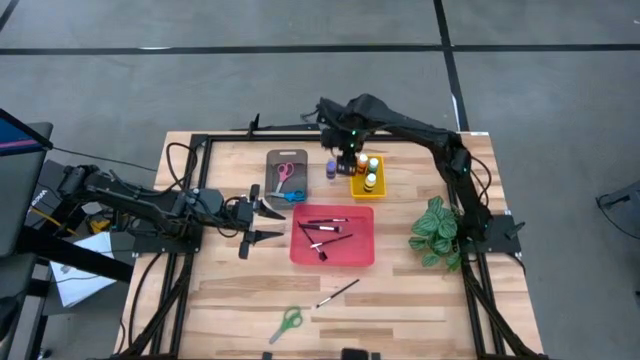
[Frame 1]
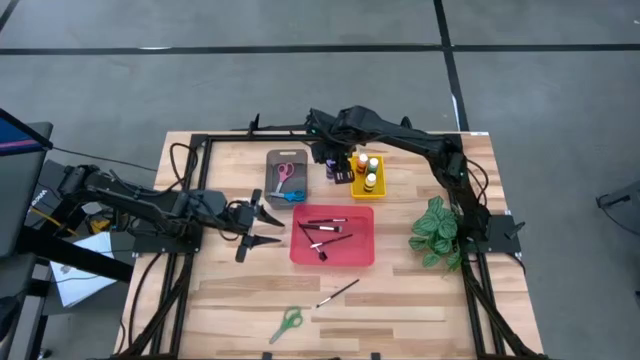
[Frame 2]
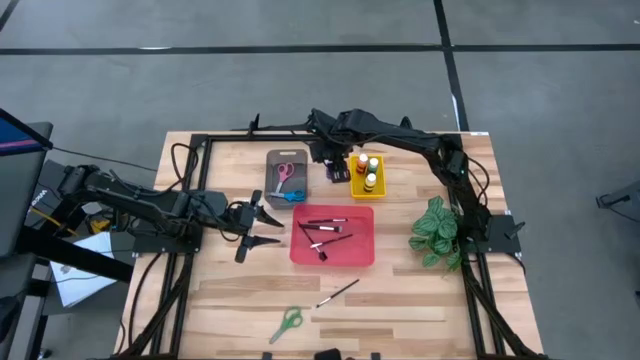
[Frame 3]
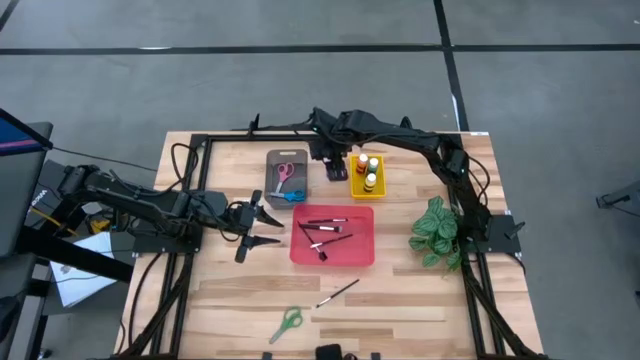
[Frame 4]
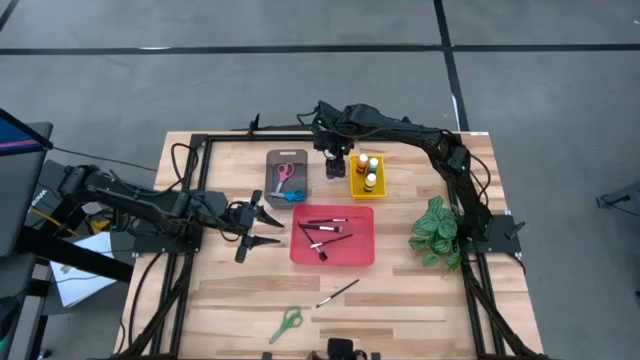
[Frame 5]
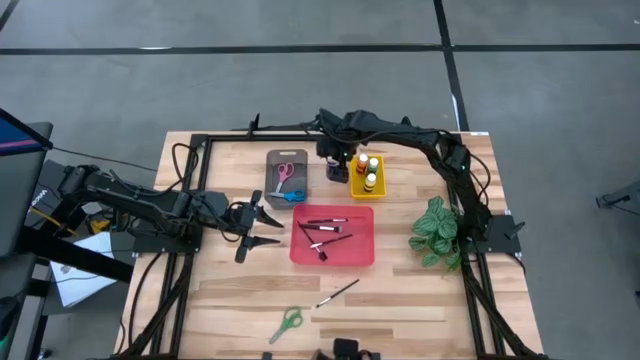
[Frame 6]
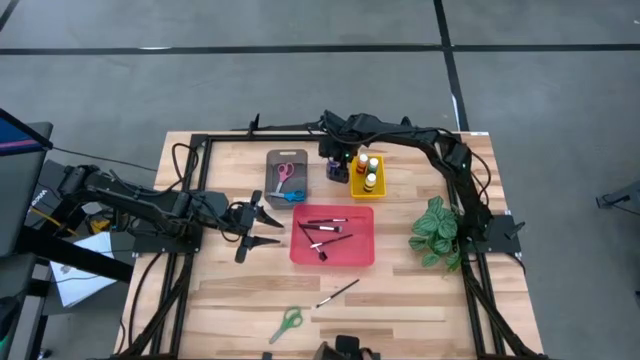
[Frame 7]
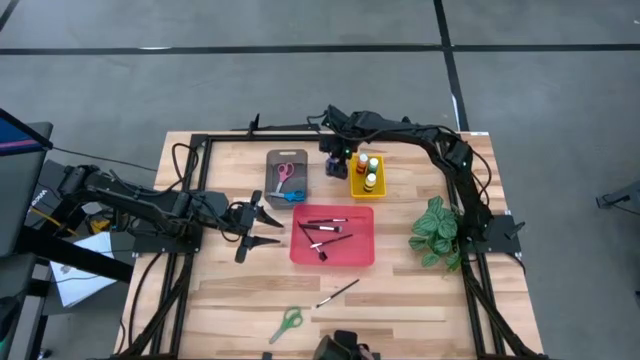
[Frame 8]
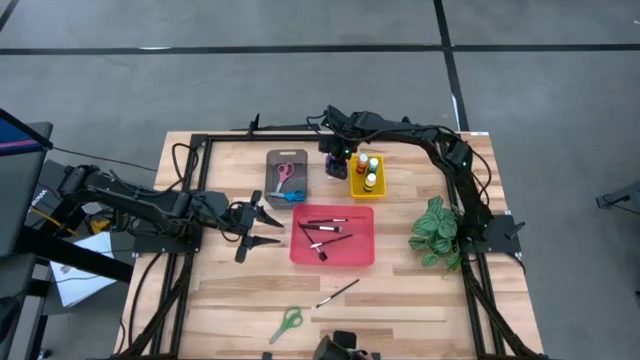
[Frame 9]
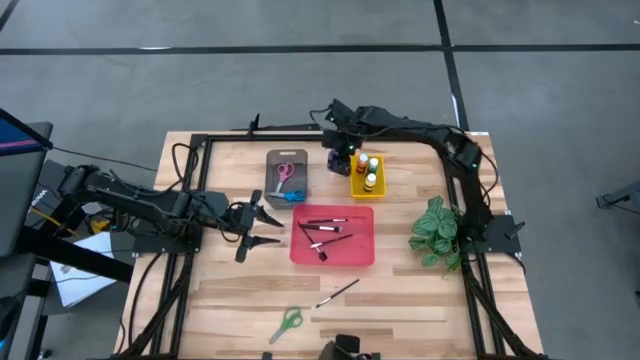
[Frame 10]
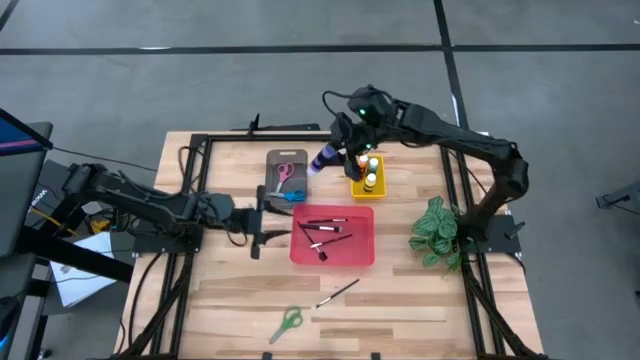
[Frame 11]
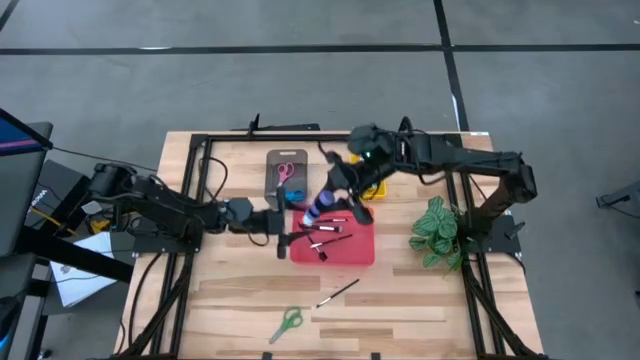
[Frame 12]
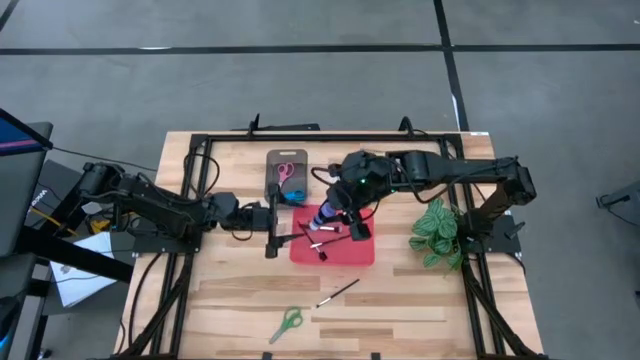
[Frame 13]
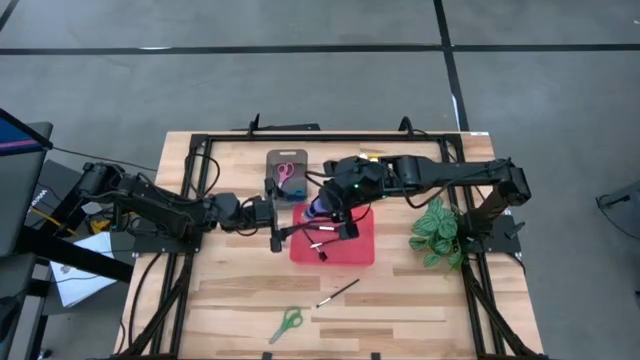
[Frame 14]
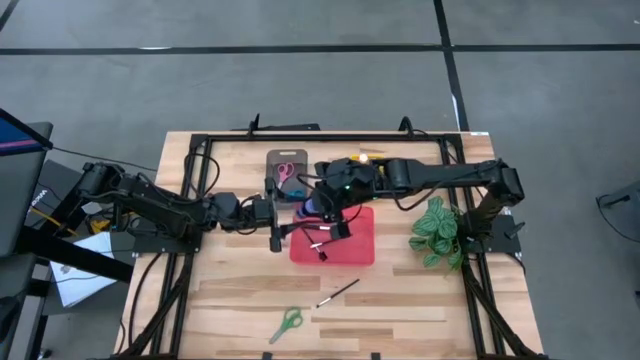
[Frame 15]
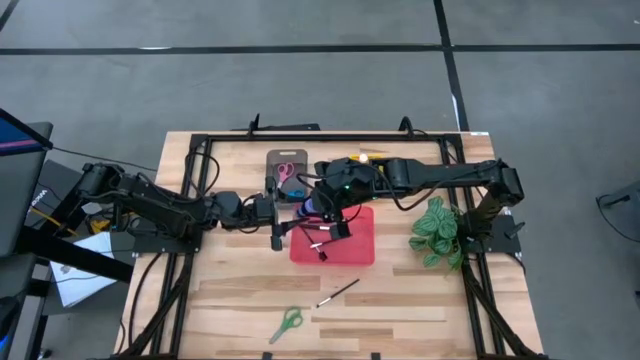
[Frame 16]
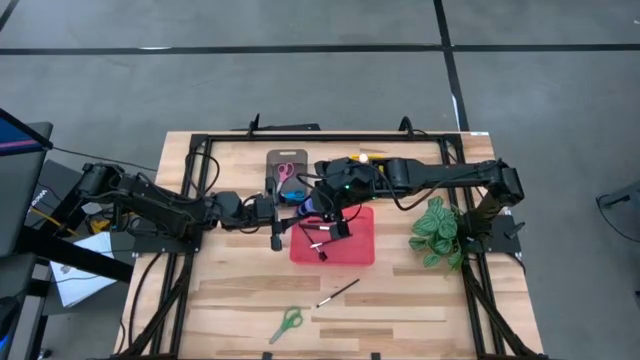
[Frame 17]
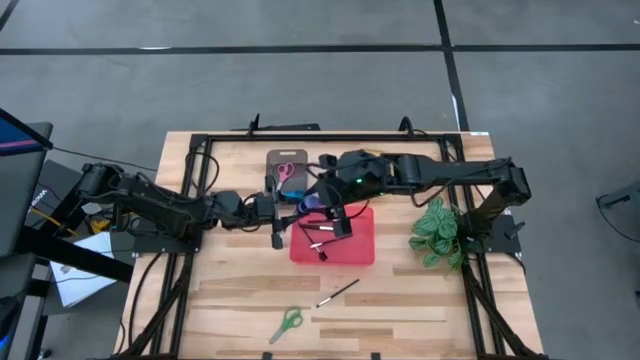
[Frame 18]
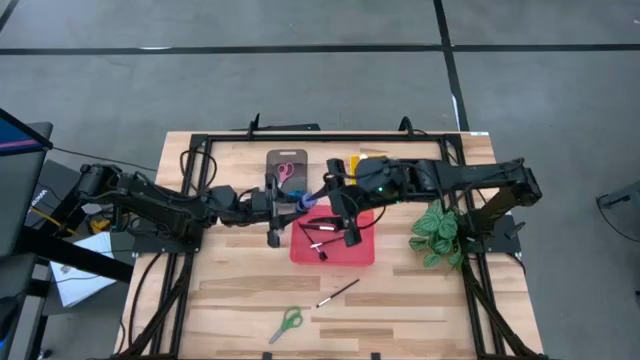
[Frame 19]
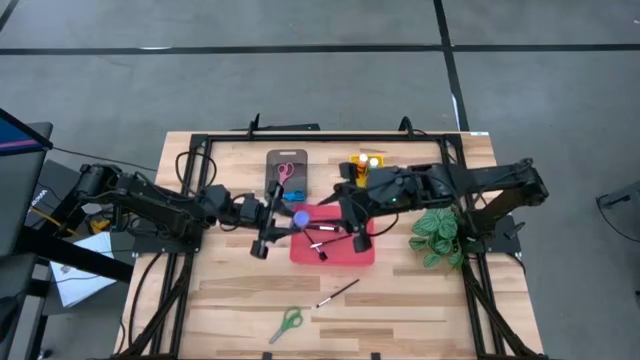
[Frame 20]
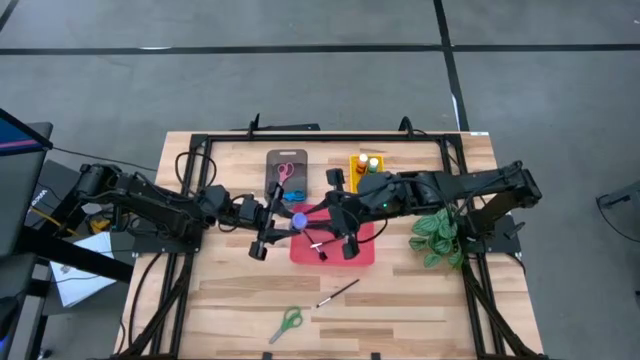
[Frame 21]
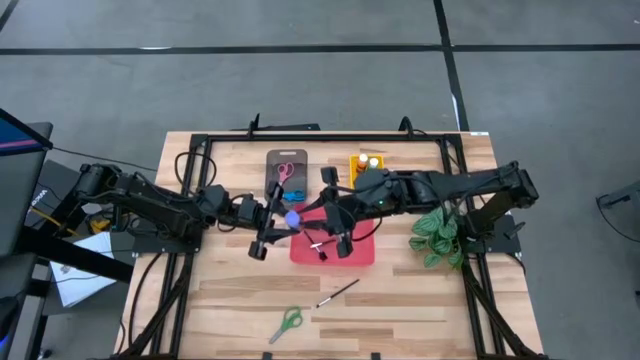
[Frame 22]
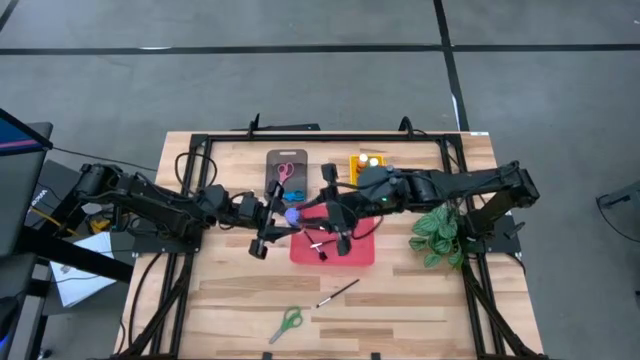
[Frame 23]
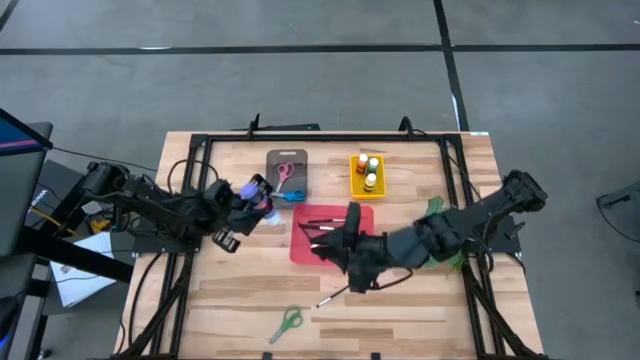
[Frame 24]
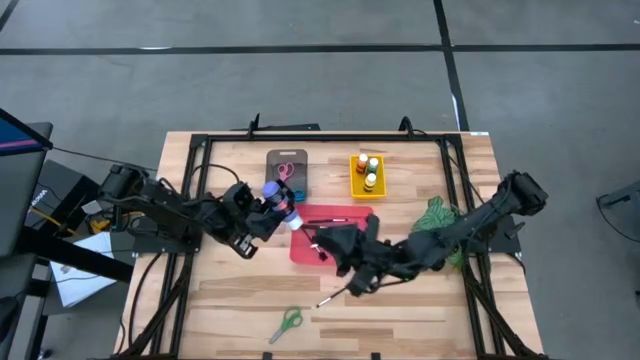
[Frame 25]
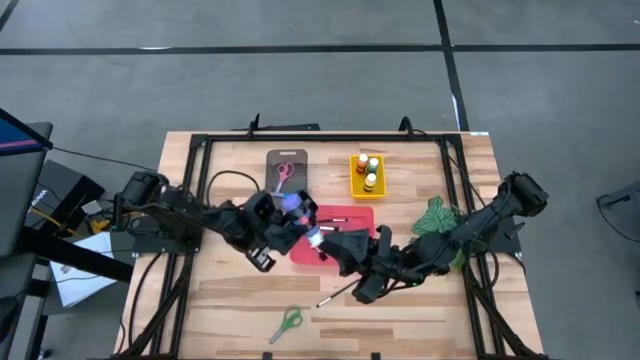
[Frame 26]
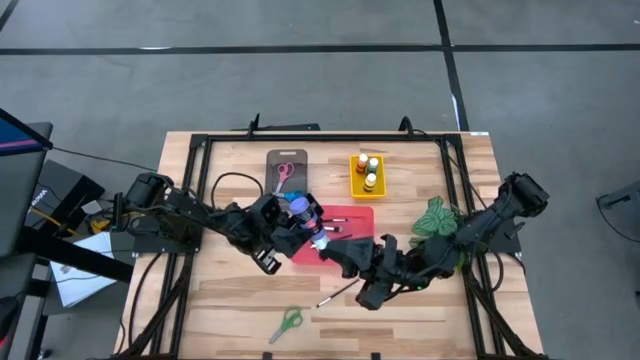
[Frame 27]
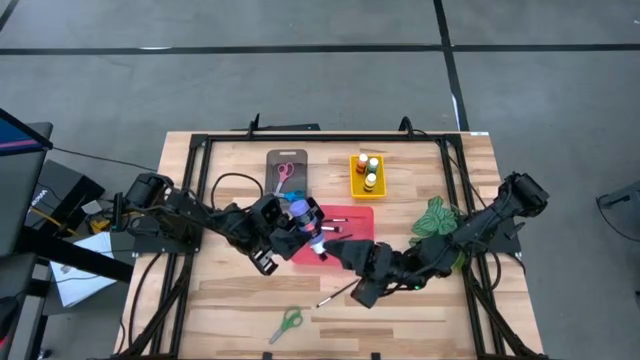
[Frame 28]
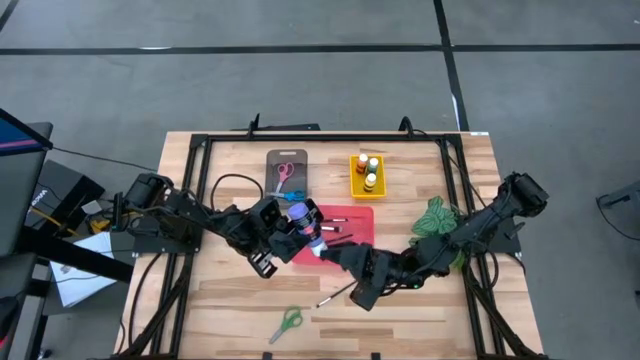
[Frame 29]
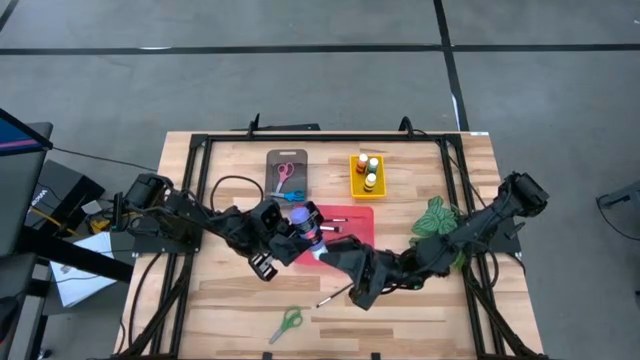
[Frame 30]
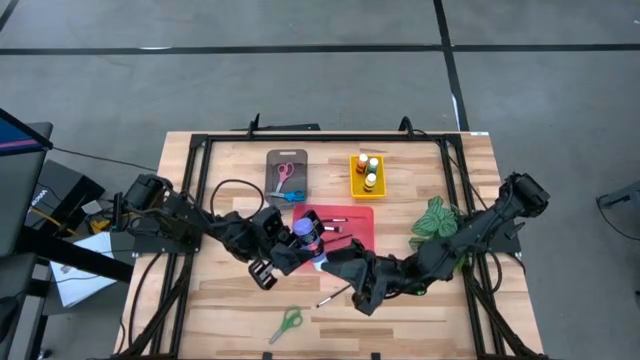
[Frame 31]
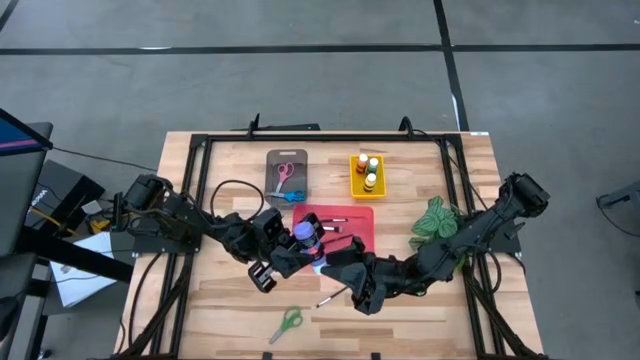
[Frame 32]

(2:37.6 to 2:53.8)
Task: Pick & Place Paint Supplies
Put the violet paint bottle into the yellow bin

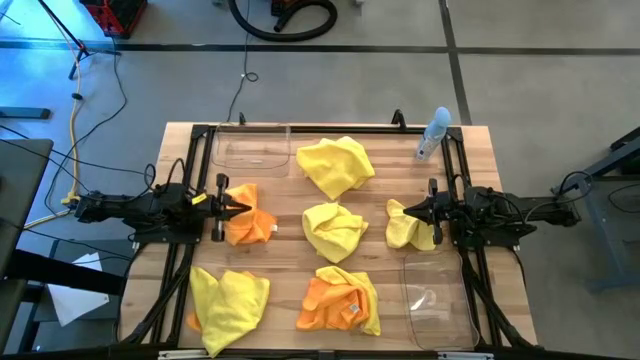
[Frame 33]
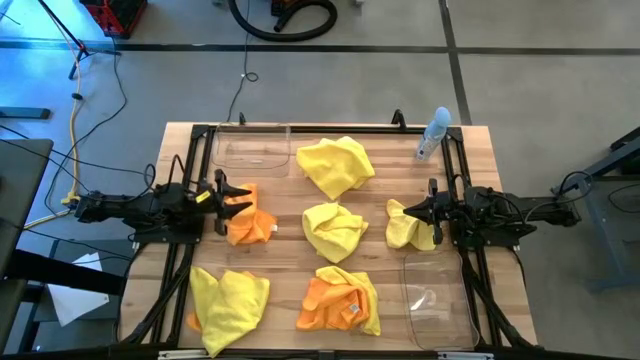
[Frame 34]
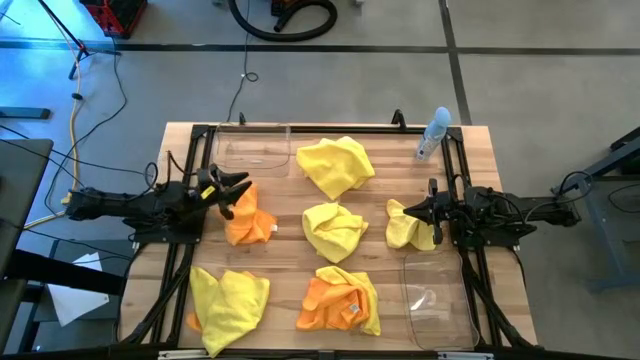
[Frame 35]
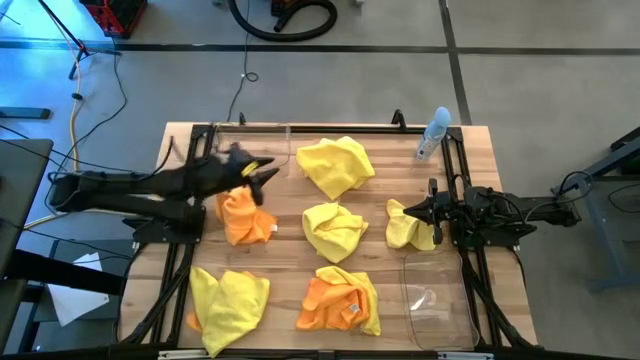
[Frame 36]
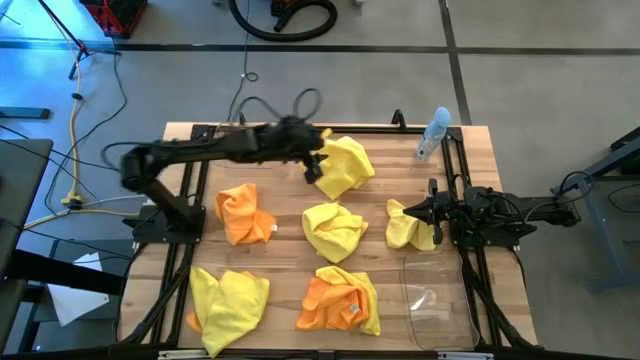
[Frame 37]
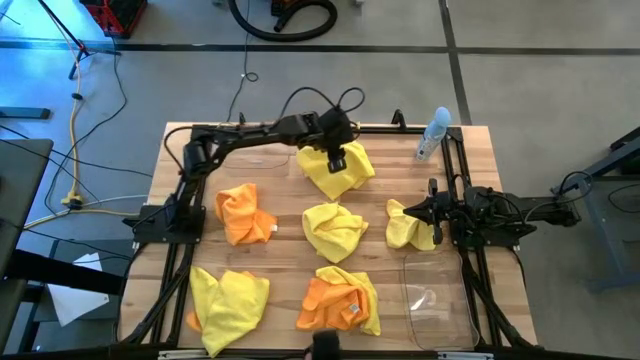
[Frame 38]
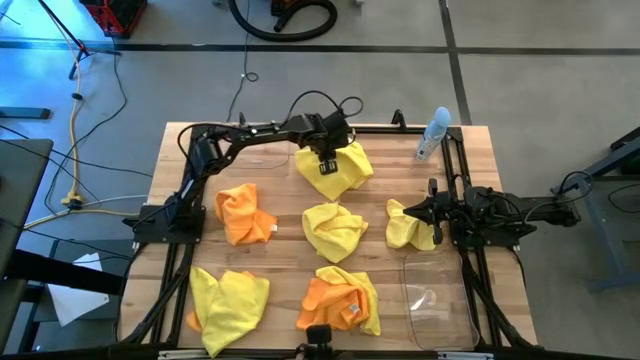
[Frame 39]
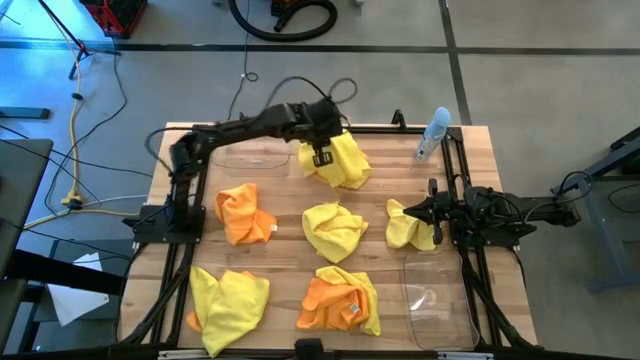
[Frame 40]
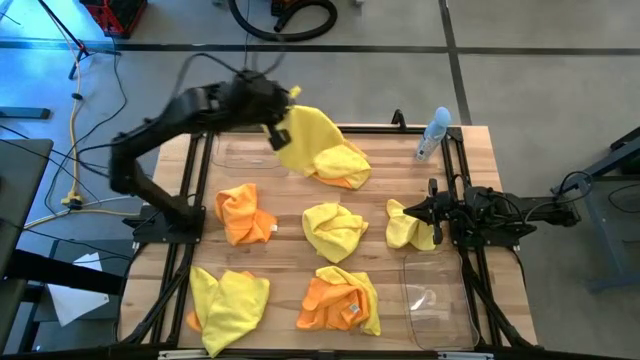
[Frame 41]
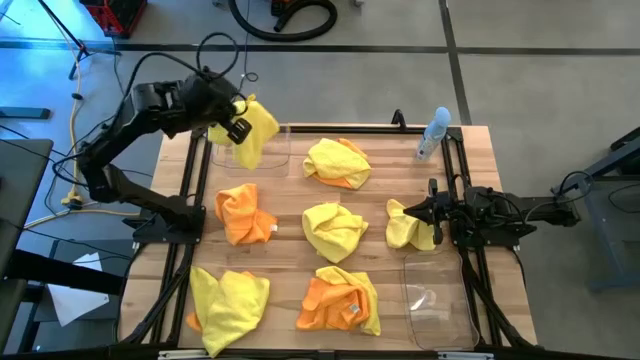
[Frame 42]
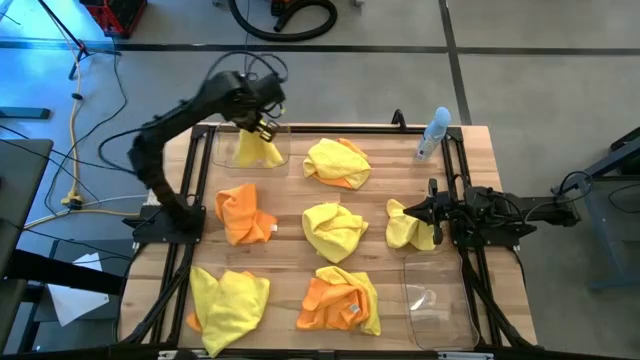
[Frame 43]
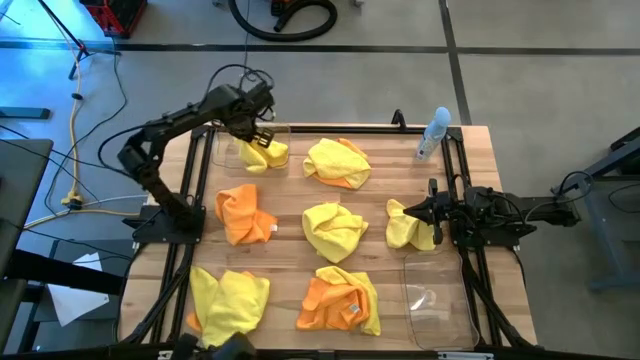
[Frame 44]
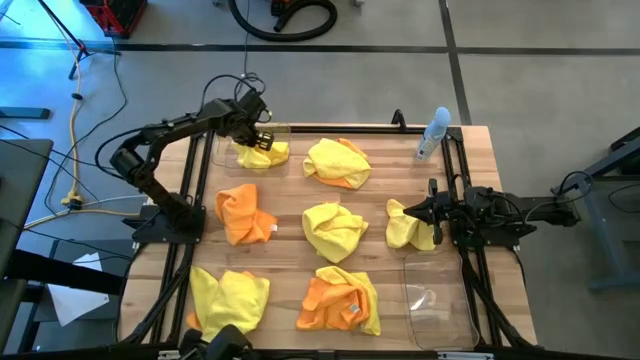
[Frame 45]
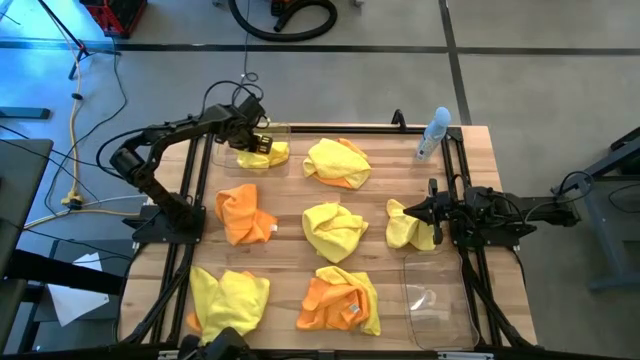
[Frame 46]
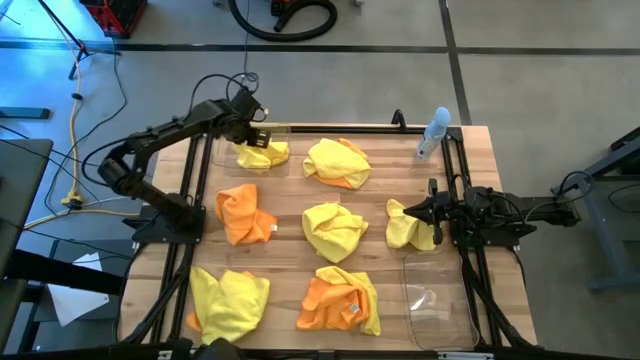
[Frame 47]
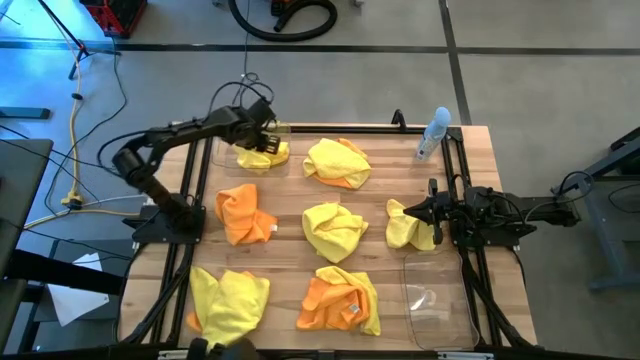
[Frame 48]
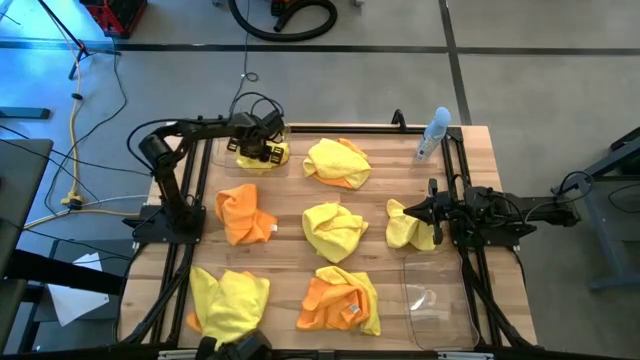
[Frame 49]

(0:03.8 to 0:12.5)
Task: Sort microfiber towel by color & place in baskets
Put the yellow towel into the top transparent bin
